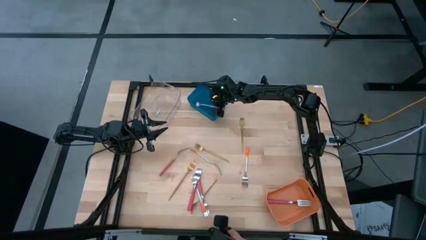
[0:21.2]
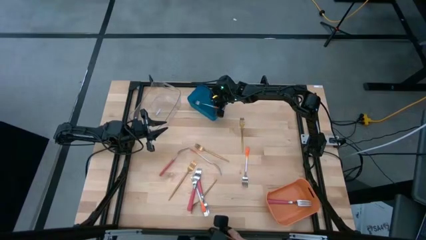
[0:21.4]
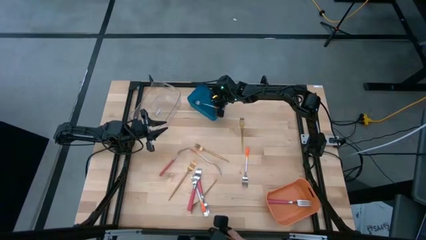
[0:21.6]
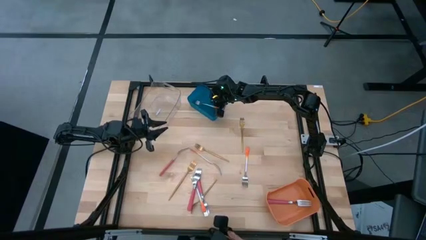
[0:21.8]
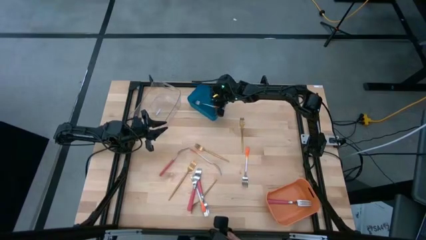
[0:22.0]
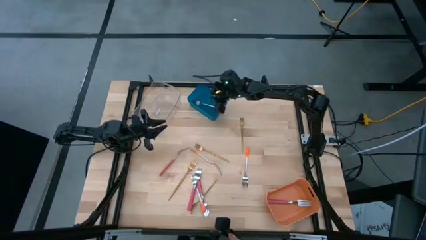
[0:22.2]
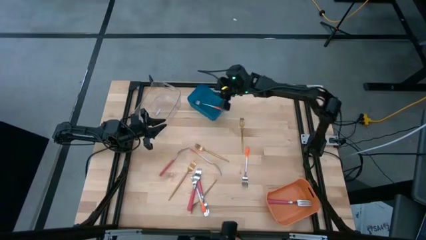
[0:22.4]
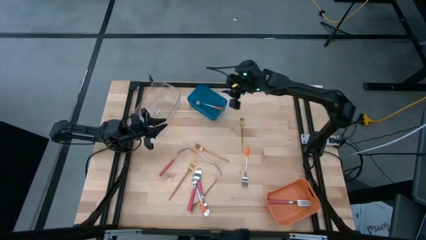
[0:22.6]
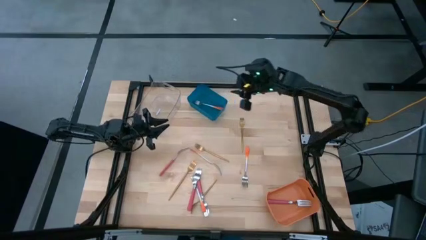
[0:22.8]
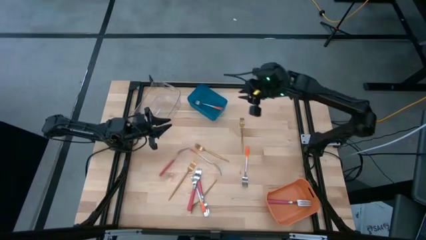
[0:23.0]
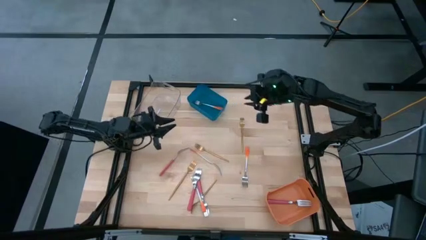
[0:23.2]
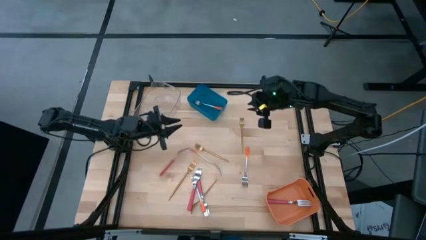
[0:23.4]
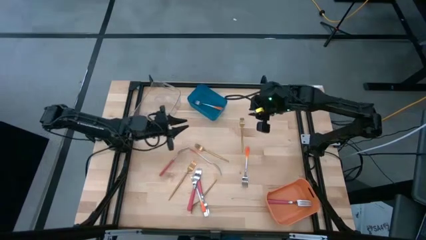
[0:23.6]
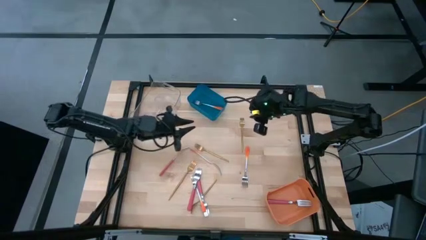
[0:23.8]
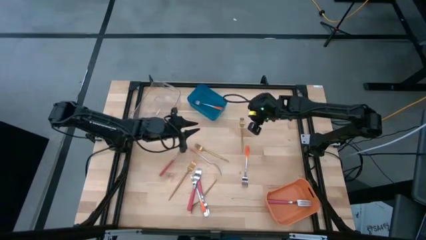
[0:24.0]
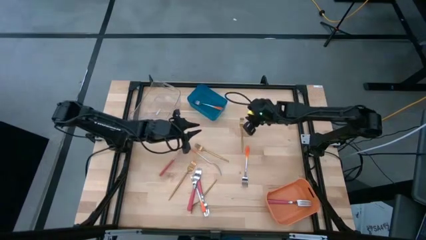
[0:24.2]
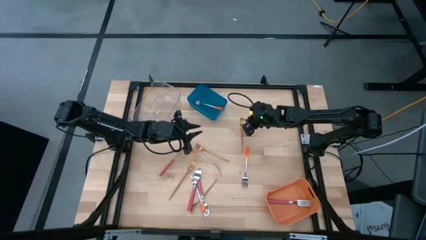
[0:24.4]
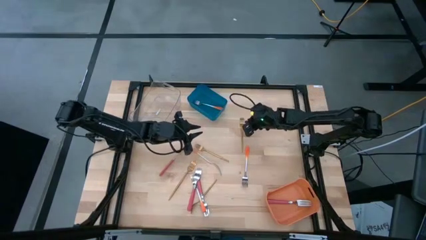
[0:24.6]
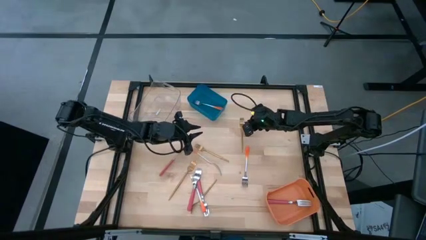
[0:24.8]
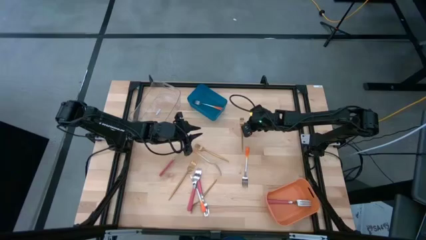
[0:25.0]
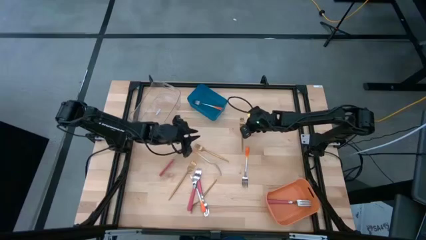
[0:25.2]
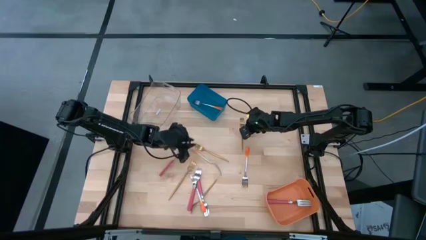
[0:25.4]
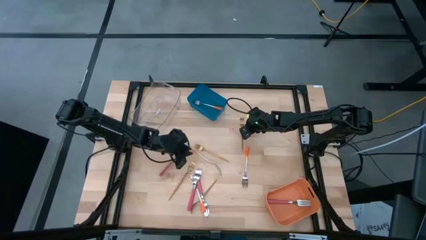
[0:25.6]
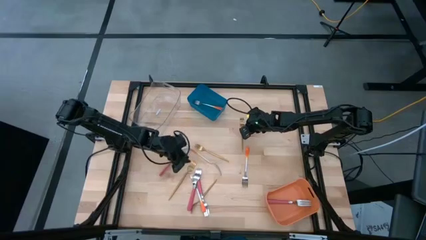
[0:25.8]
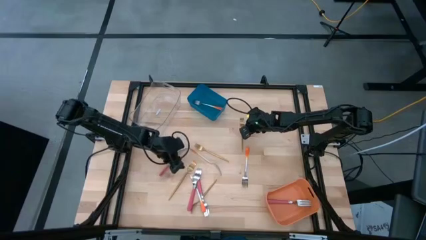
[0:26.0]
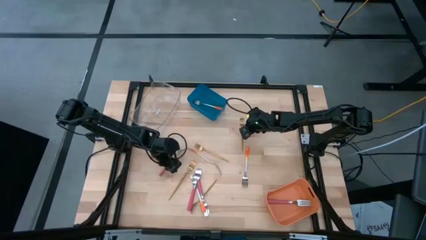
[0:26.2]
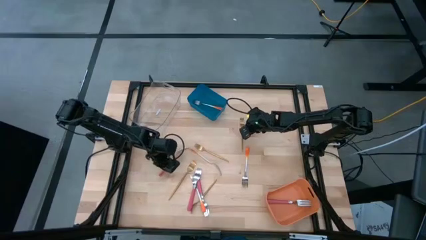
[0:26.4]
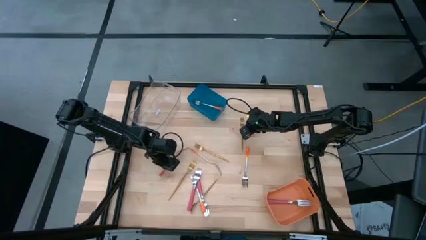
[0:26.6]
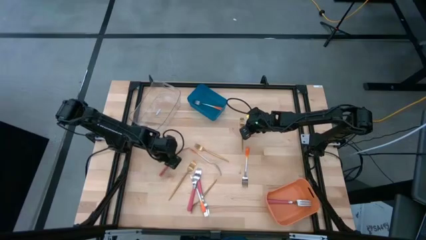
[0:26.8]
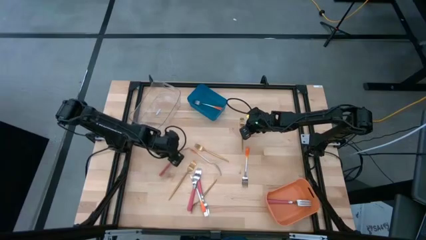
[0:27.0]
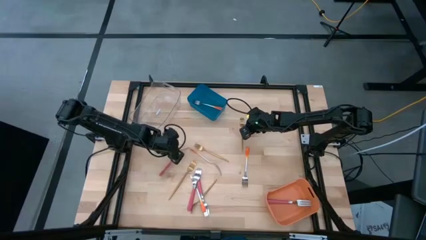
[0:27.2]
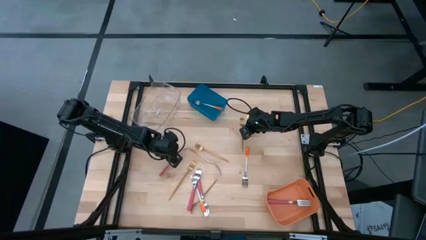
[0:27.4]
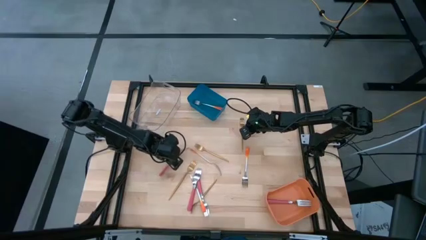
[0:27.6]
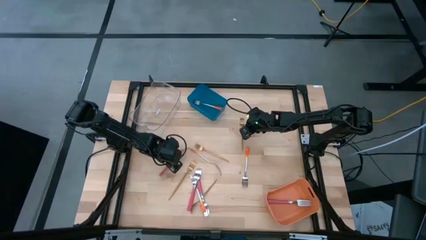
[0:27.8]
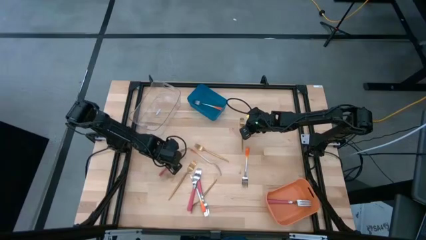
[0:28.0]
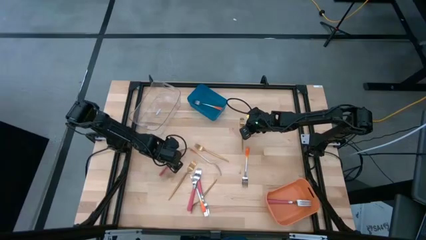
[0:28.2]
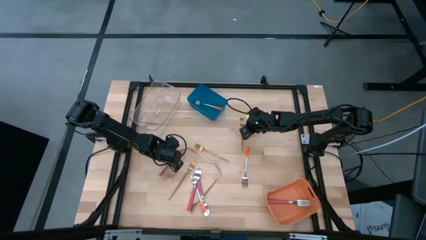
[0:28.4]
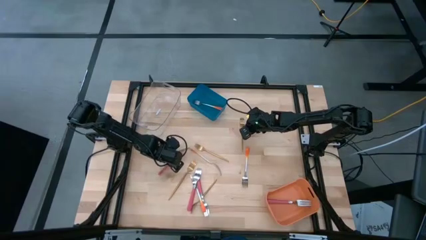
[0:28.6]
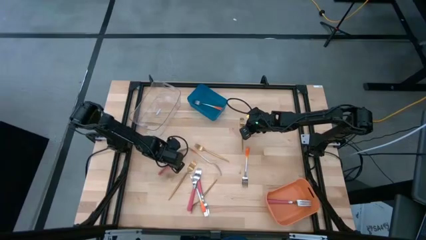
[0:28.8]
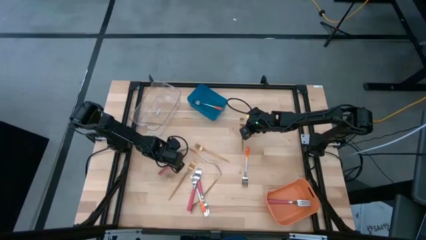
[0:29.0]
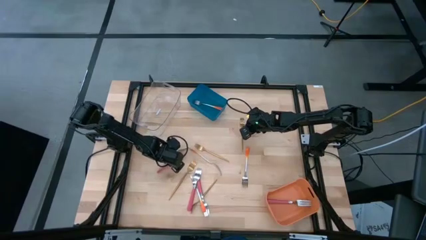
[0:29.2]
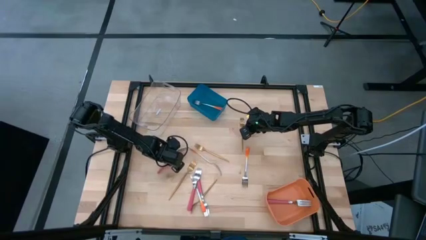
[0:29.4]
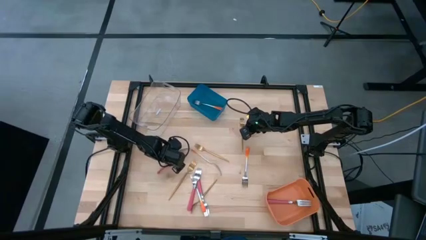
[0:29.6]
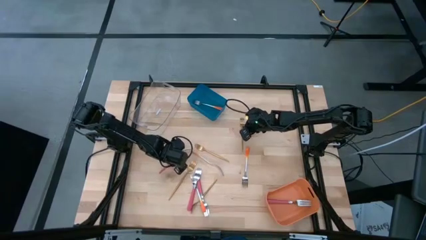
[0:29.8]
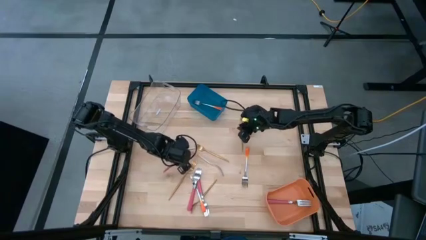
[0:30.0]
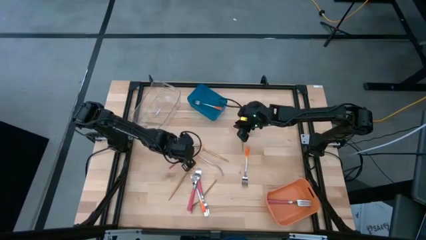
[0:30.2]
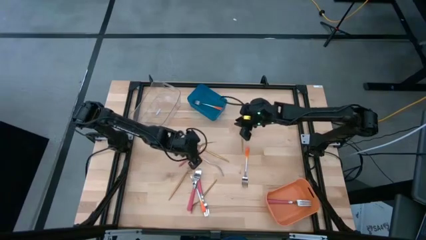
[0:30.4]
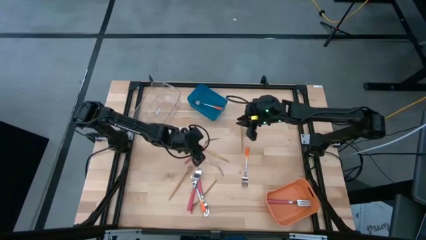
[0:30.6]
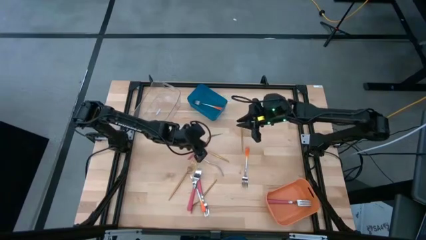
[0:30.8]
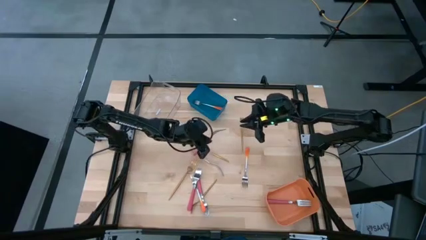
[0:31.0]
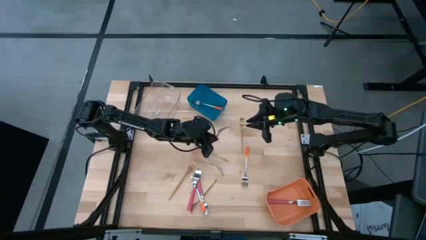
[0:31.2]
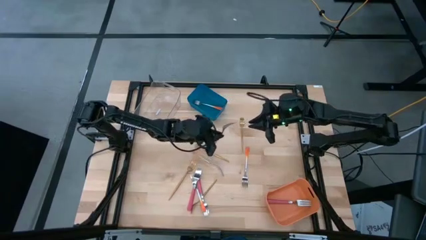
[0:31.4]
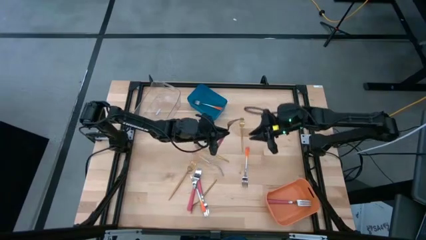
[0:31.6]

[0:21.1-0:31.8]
Task: Sort silverware by color (type)
Put the pink fork into the orange bin
